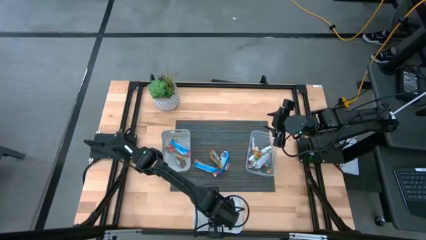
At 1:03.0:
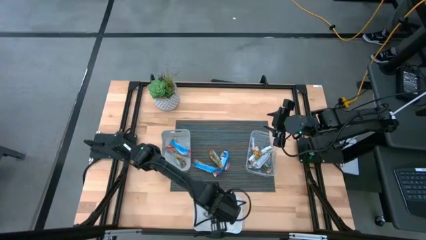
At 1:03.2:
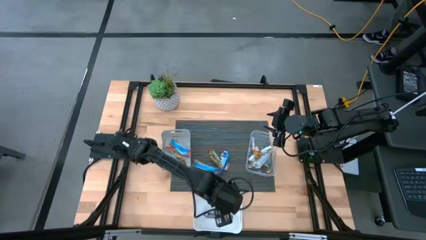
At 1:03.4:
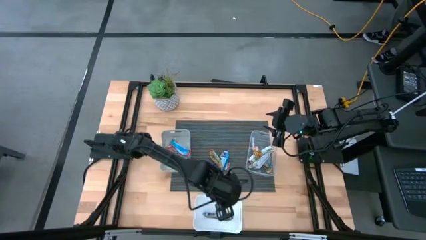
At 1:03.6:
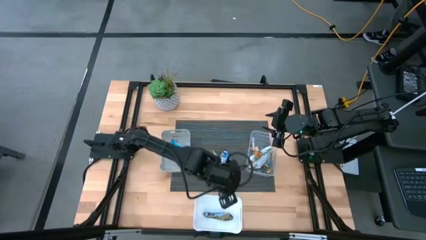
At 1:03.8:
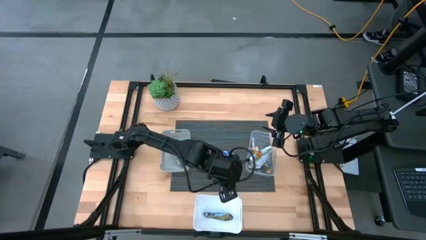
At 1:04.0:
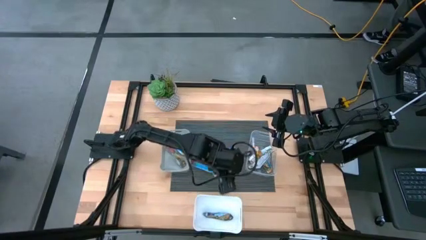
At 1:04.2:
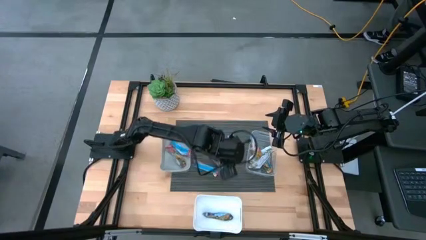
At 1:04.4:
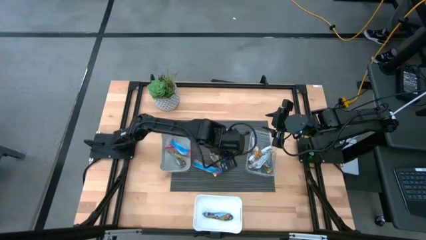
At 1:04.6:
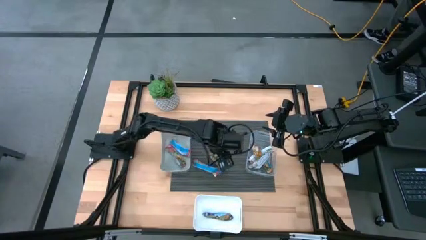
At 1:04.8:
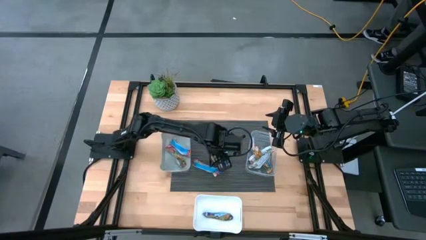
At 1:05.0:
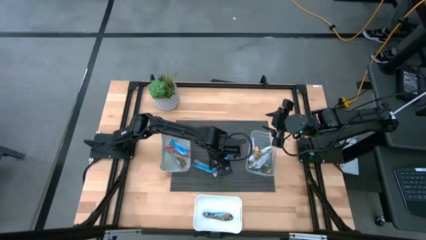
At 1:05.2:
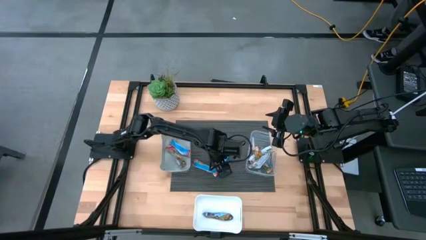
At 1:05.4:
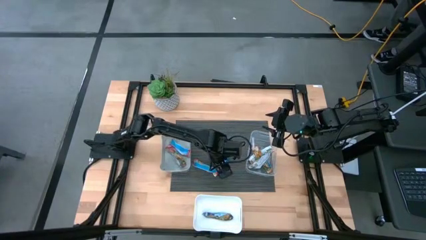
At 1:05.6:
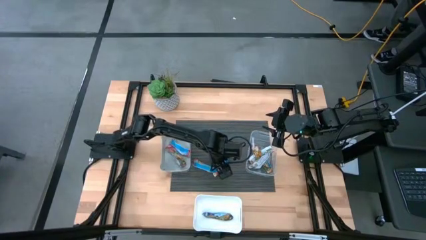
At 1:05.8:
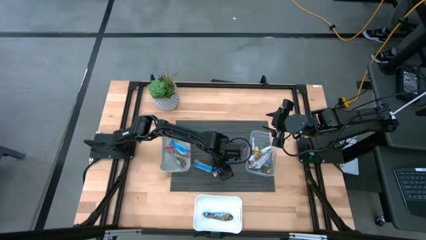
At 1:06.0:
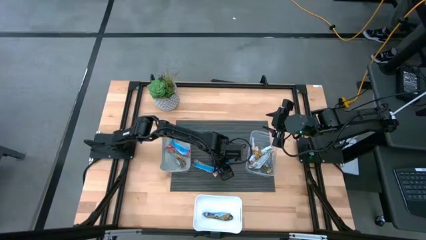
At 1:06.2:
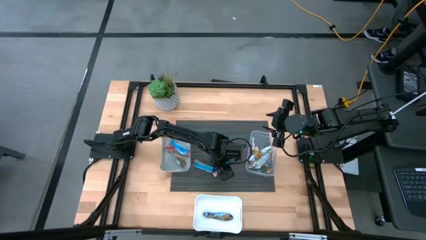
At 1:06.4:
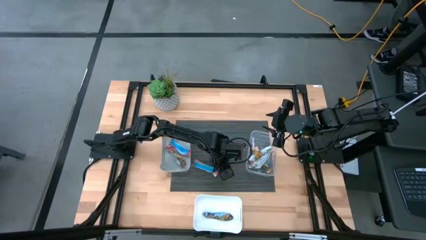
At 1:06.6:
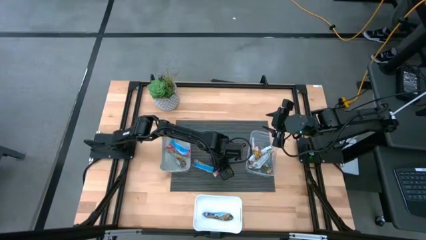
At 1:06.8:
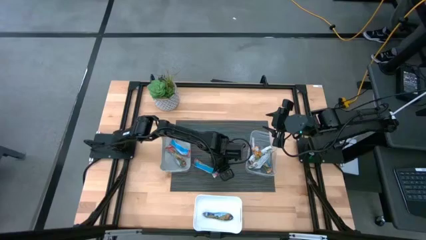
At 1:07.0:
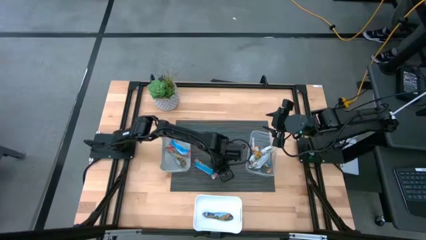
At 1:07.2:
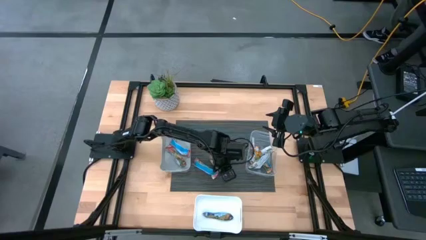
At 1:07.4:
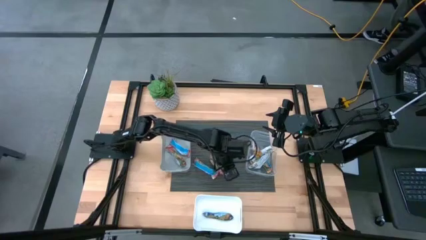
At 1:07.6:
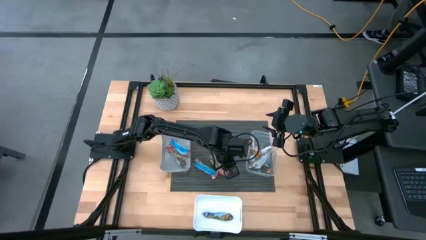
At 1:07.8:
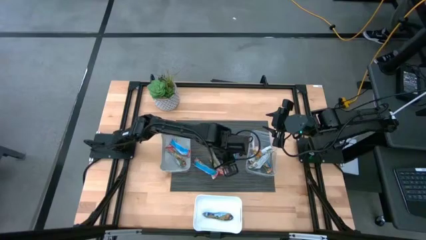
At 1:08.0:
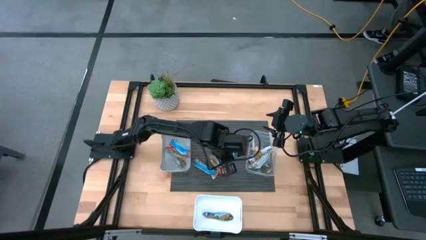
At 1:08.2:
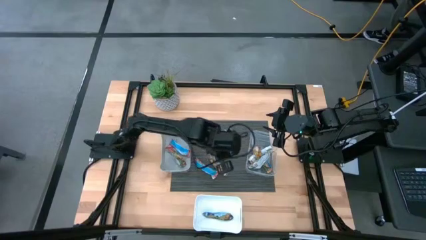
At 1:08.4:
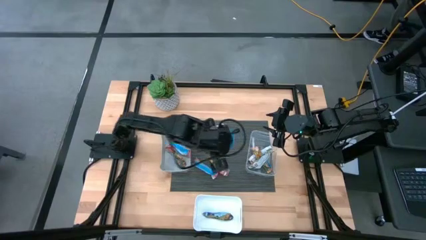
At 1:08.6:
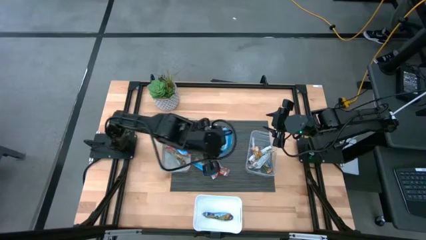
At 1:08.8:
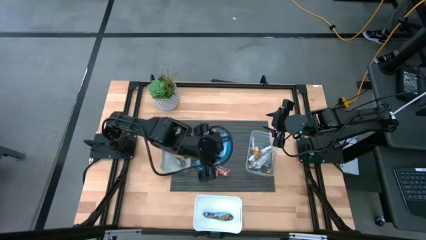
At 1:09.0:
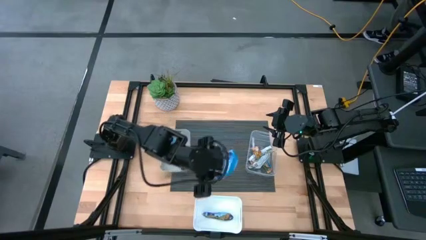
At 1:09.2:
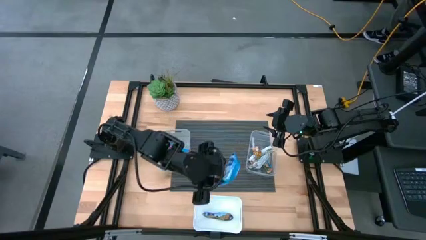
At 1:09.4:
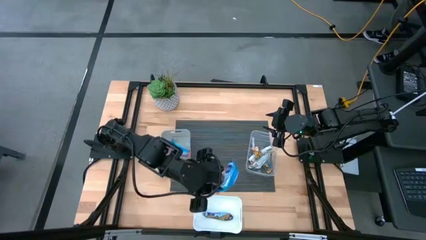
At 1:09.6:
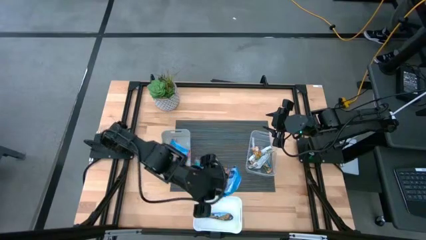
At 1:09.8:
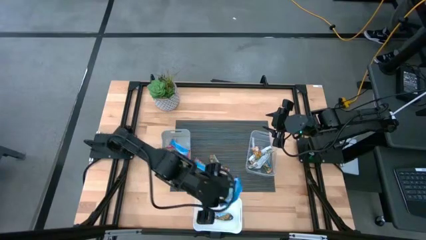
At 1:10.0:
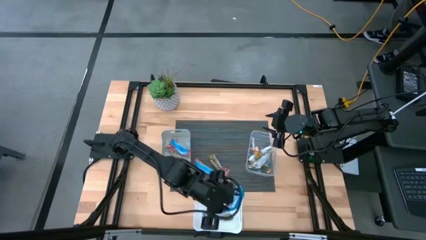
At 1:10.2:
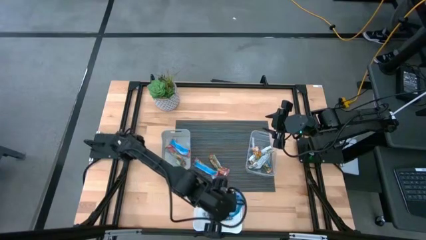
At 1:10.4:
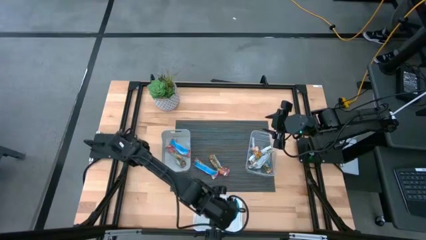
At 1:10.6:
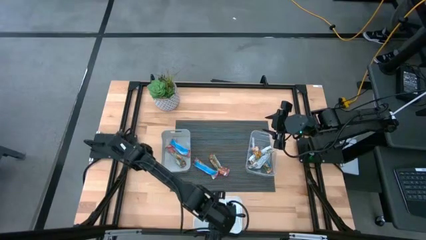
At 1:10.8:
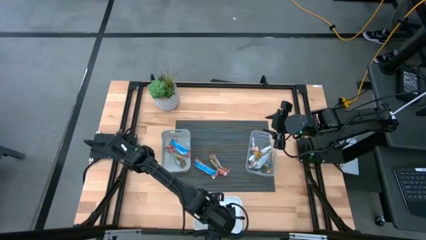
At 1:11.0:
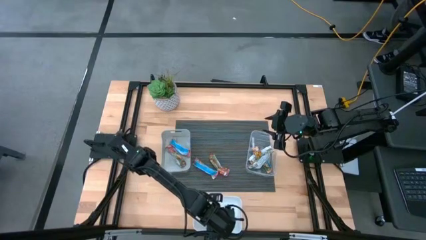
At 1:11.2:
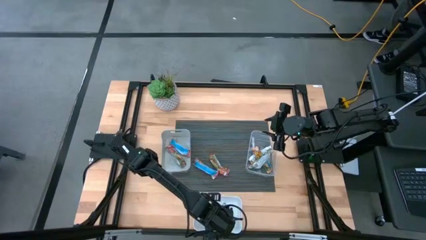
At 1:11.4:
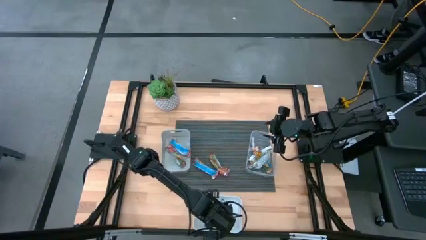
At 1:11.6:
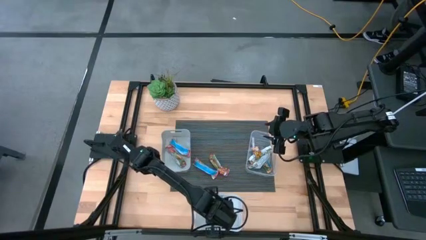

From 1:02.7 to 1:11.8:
Task: Pick and place Granola Bars by type
Put the blue granola bar into the white bin

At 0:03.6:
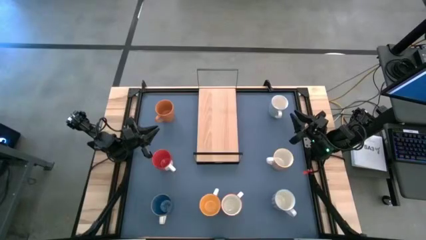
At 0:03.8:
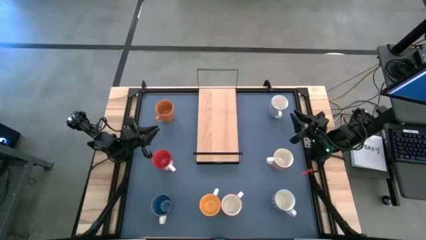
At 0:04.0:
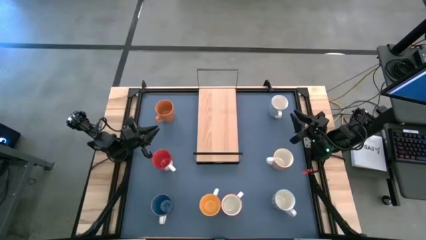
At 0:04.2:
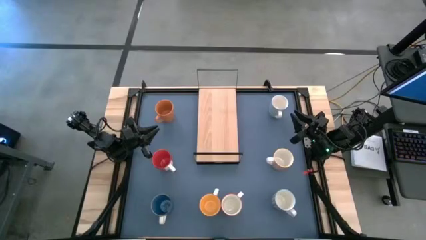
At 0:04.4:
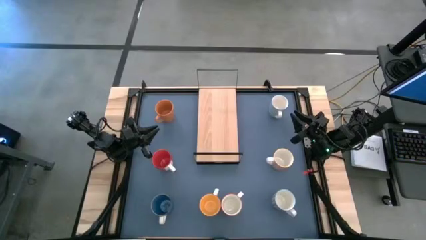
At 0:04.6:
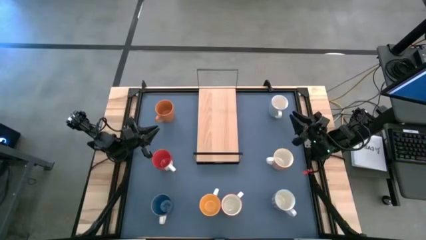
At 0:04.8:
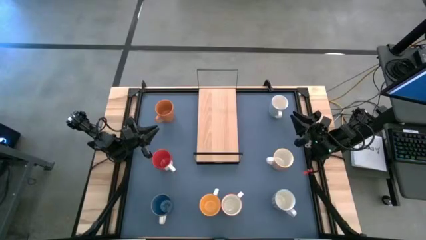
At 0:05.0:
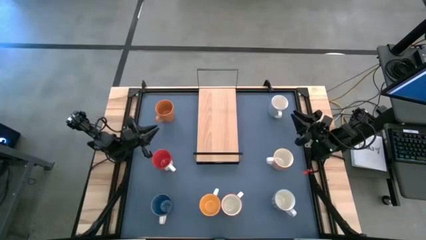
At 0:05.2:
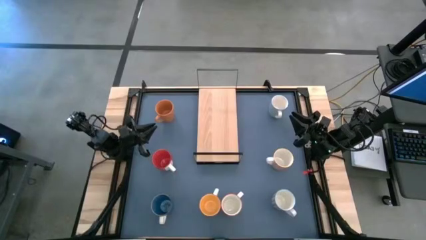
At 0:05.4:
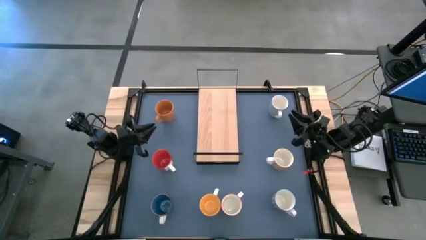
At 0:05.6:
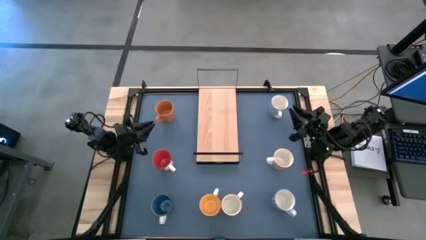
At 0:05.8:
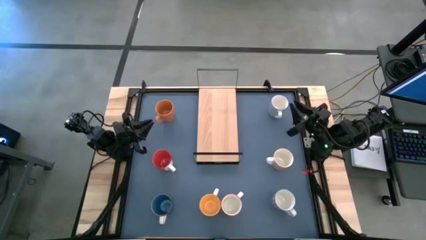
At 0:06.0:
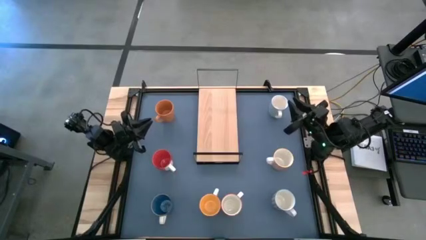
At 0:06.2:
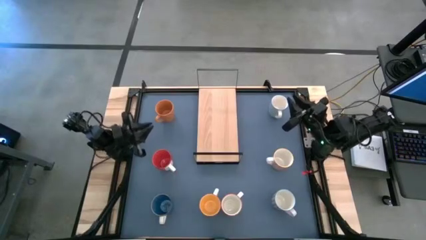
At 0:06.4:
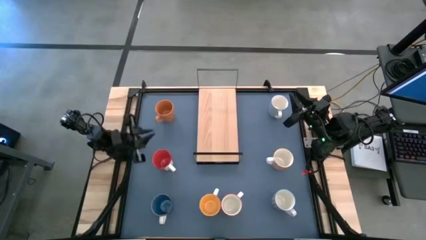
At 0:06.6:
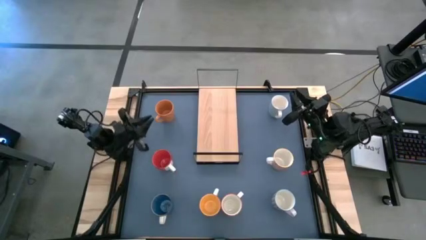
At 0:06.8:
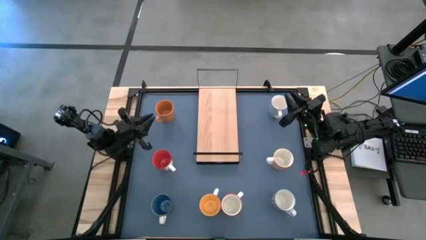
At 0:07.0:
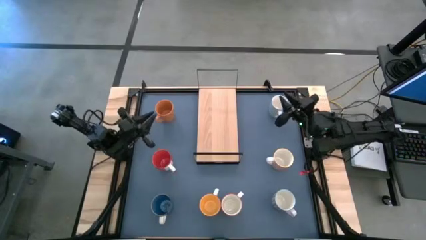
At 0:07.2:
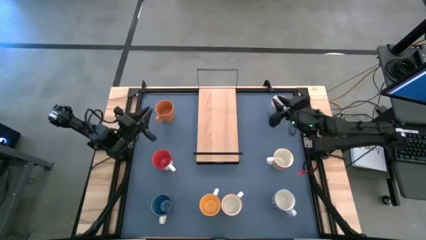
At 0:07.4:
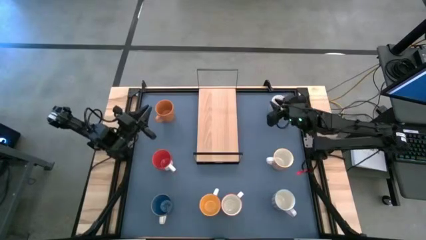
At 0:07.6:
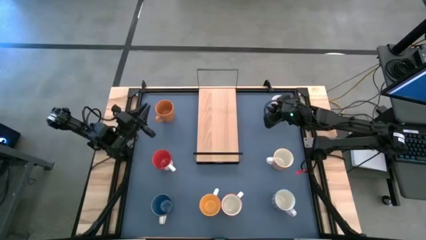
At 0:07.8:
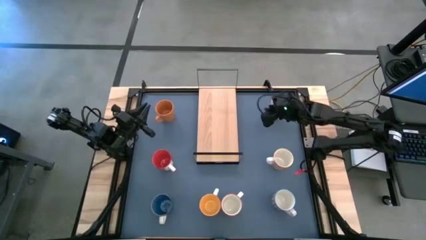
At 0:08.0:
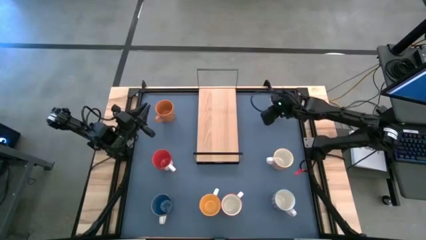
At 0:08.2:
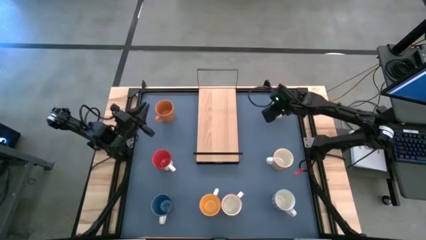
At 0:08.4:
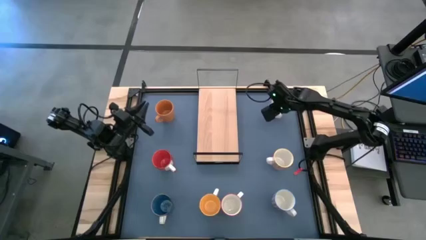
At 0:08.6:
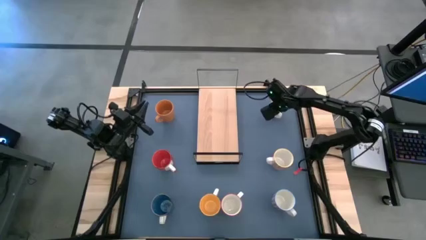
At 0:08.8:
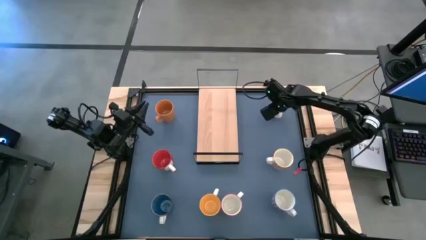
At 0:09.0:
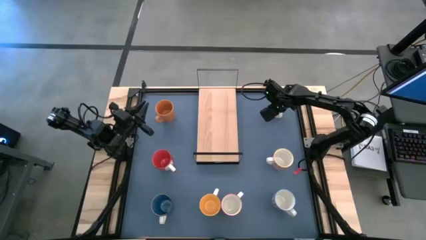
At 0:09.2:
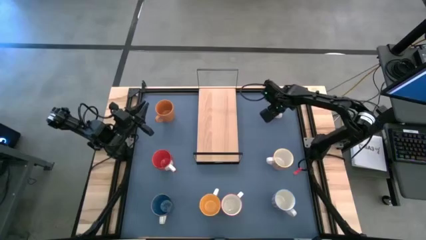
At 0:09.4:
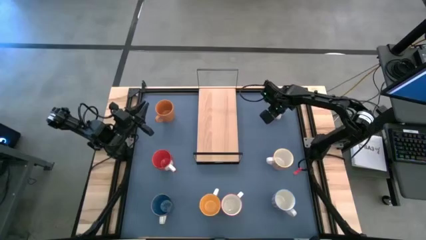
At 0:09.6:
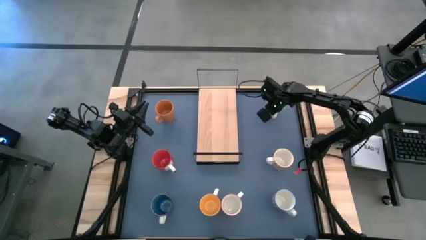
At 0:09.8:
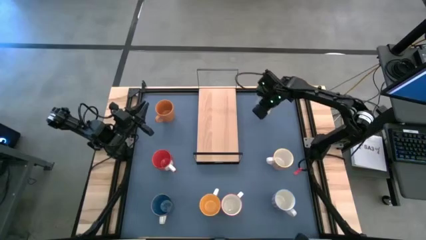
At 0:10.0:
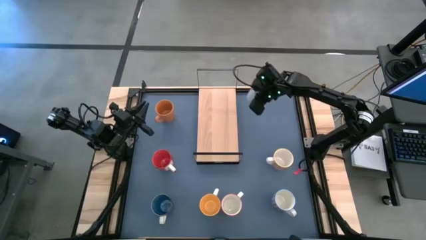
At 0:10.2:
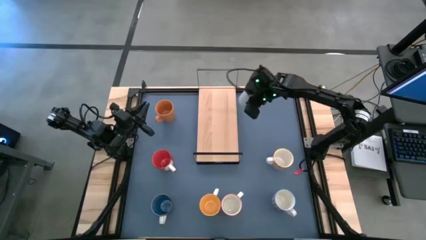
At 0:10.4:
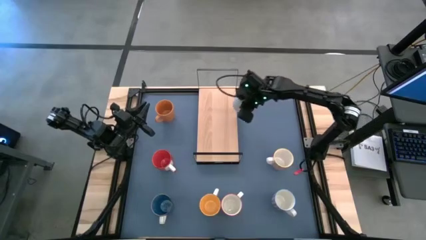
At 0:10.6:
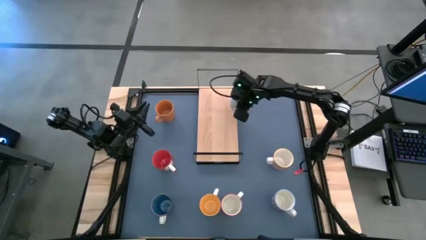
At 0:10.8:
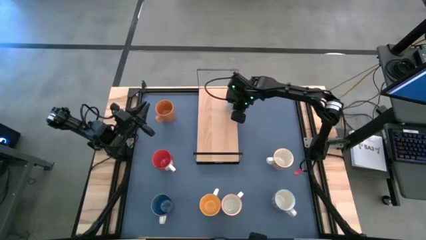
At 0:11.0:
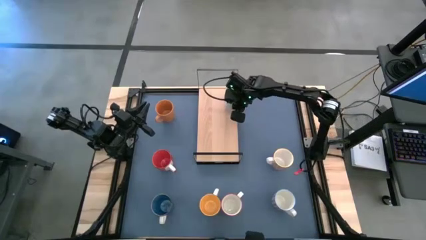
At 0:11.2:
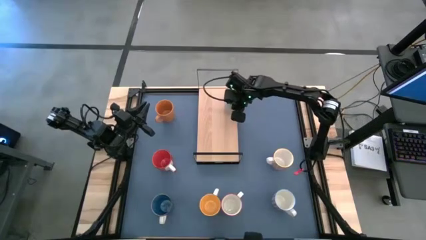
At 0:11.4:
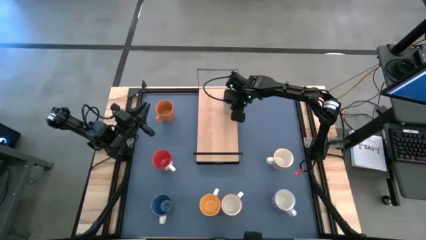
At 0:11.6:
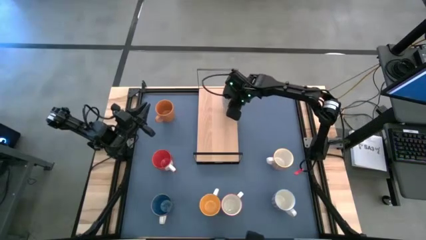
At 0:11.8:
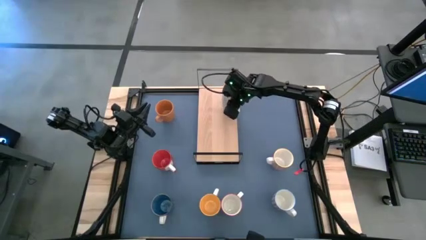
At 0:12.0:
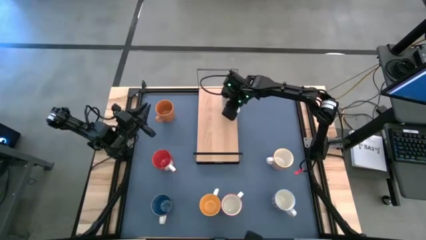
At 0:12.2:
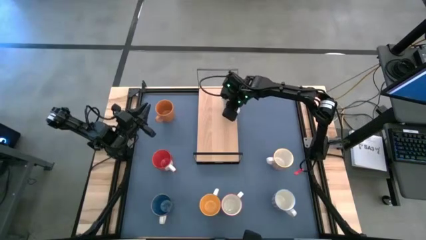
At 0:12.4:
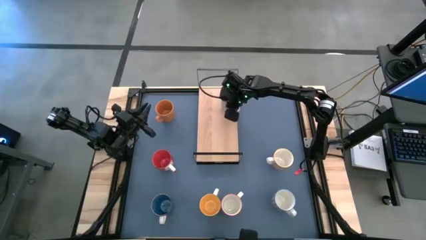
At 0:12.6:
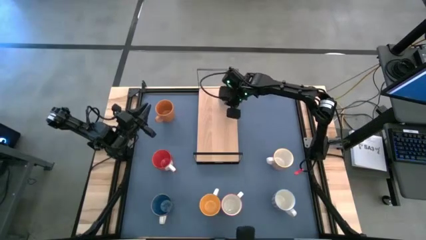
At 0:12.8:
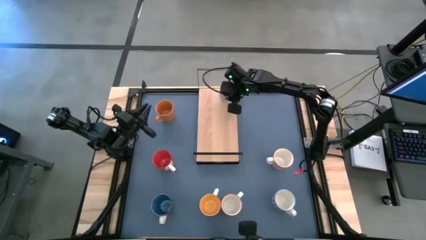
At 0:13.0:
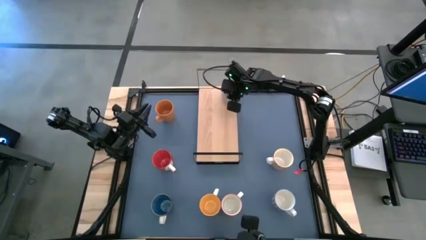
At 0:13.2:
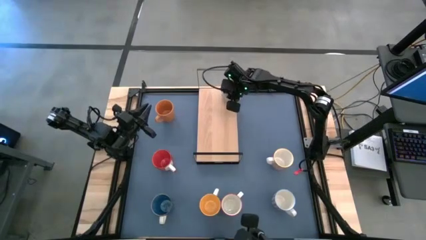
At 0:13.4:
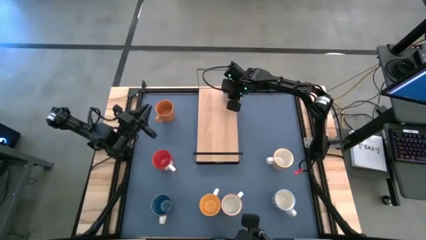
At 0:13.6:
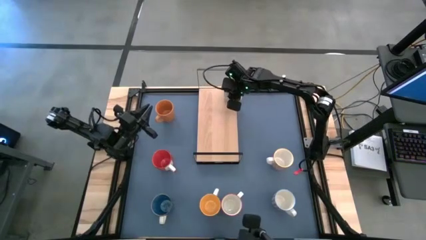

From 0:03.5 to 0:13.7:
Task: Place coffee mugs
Put the top gray patterned mug on the shelf
